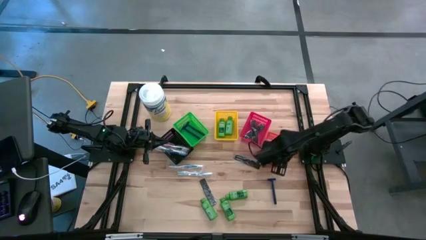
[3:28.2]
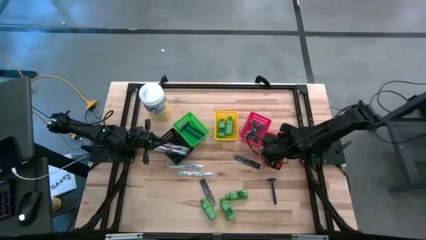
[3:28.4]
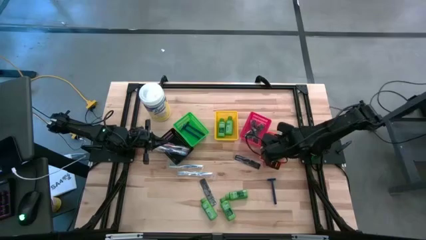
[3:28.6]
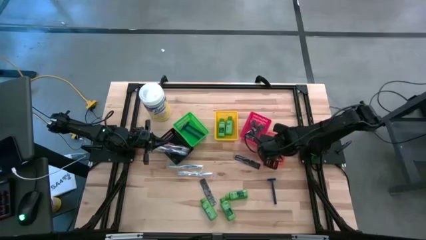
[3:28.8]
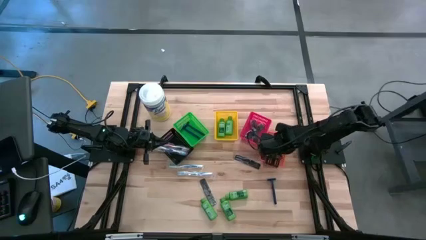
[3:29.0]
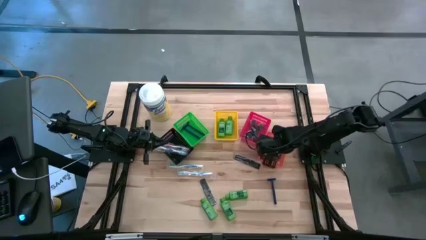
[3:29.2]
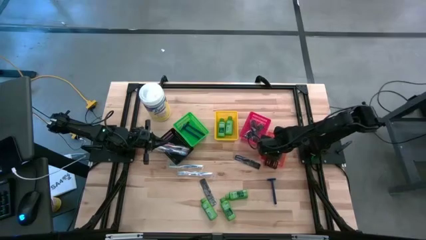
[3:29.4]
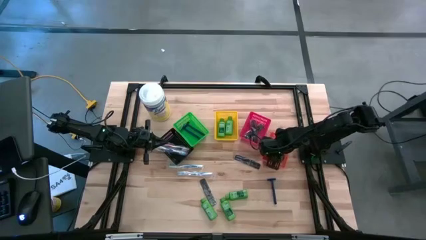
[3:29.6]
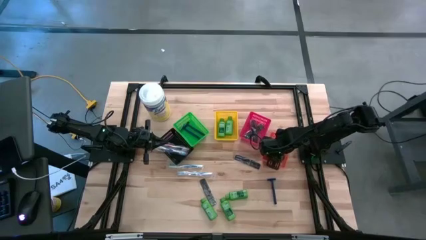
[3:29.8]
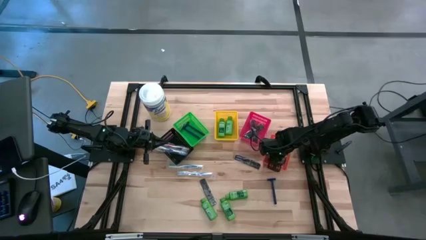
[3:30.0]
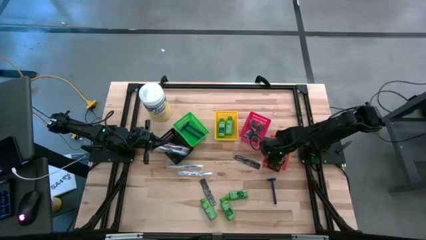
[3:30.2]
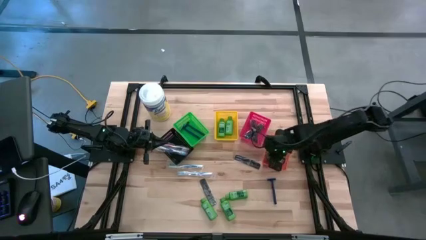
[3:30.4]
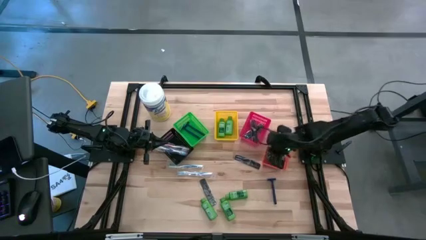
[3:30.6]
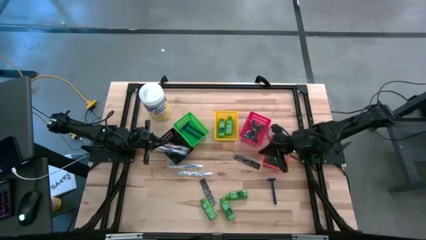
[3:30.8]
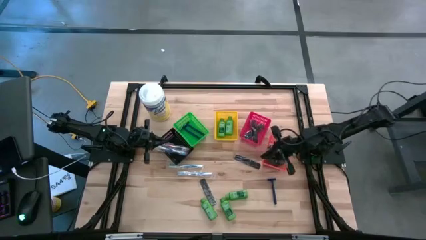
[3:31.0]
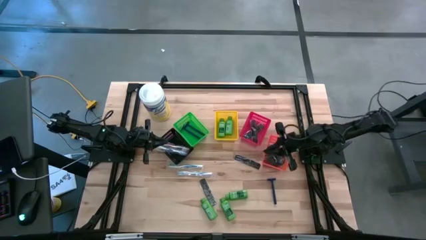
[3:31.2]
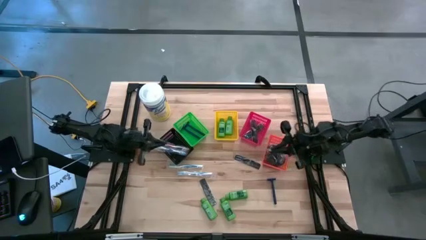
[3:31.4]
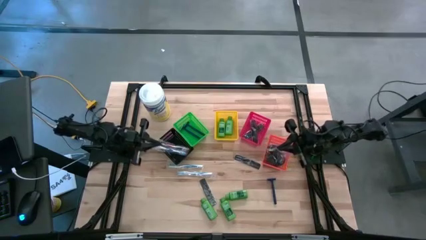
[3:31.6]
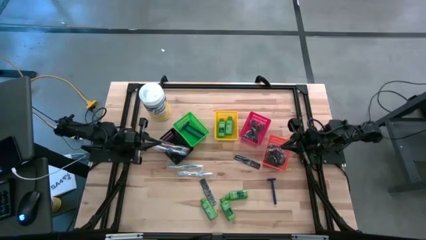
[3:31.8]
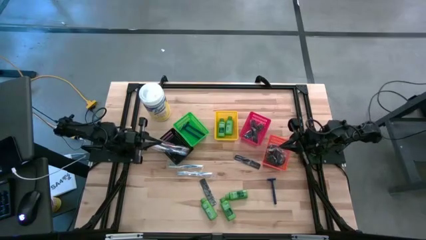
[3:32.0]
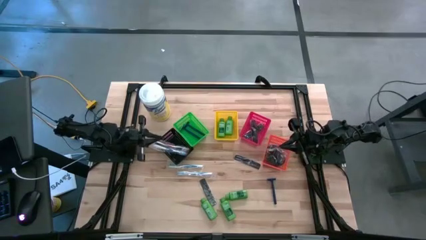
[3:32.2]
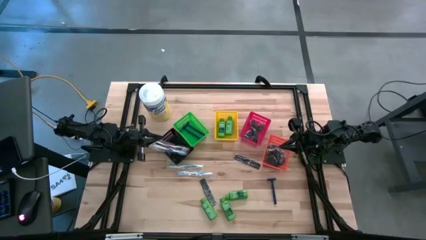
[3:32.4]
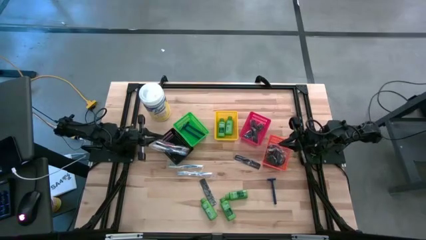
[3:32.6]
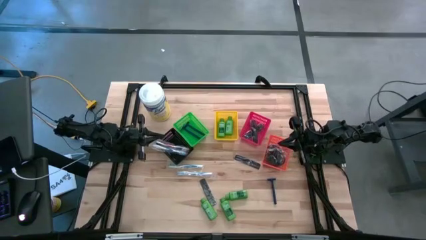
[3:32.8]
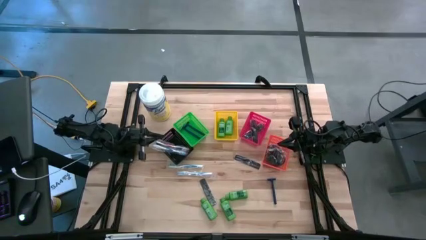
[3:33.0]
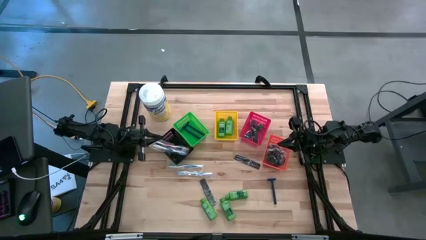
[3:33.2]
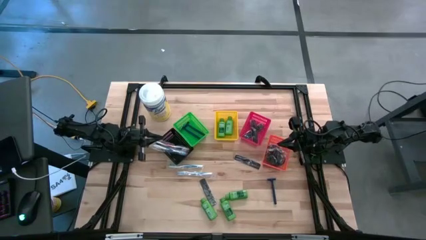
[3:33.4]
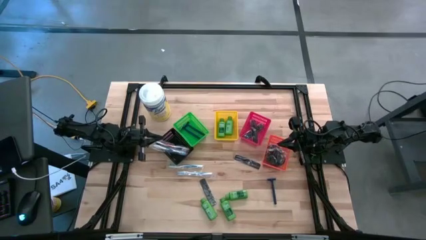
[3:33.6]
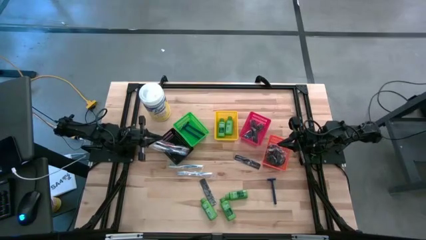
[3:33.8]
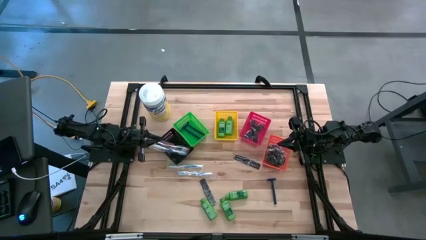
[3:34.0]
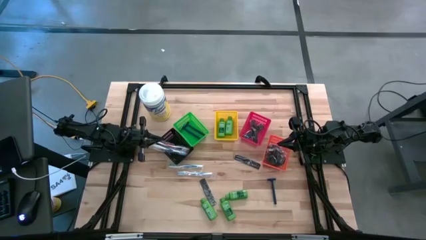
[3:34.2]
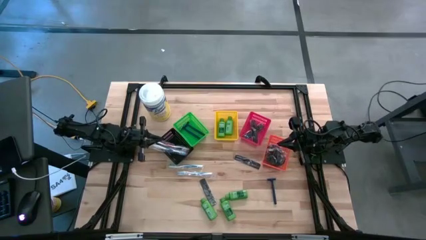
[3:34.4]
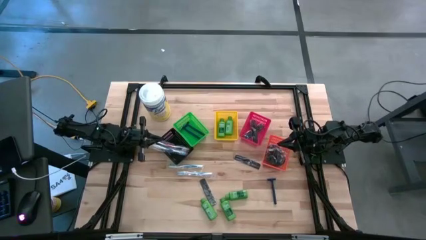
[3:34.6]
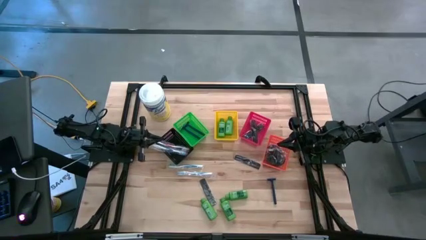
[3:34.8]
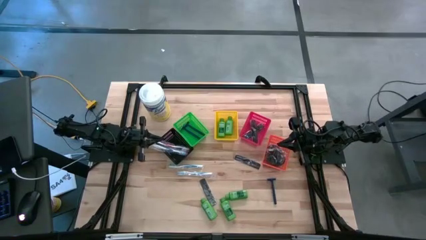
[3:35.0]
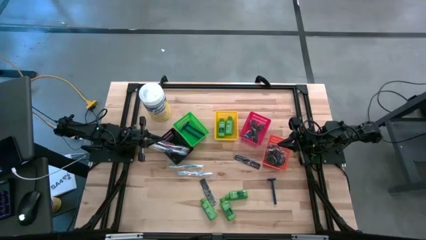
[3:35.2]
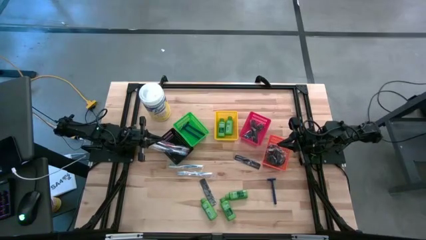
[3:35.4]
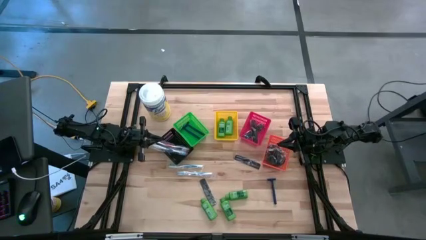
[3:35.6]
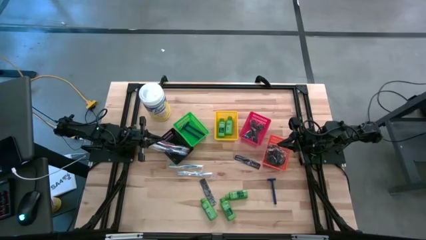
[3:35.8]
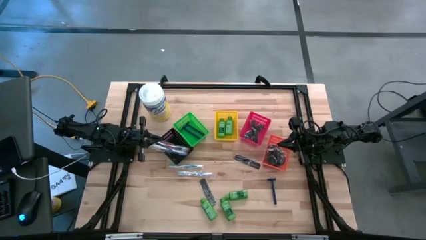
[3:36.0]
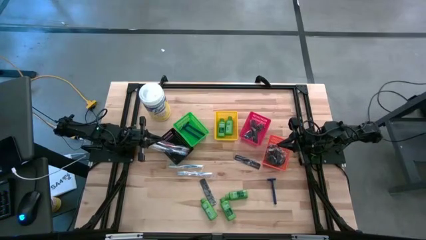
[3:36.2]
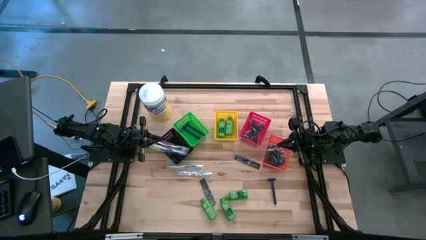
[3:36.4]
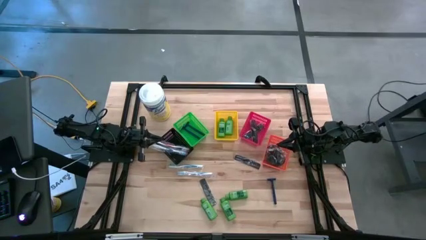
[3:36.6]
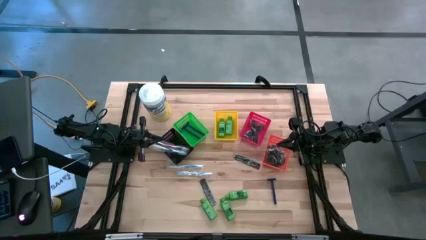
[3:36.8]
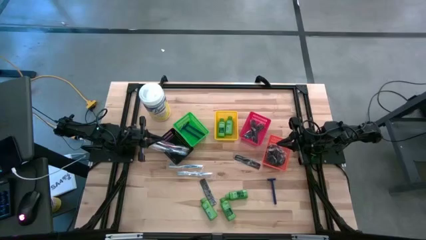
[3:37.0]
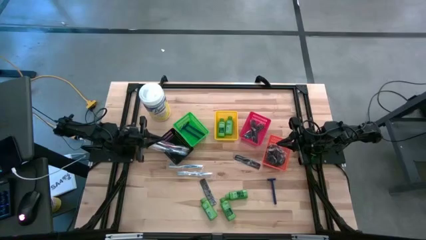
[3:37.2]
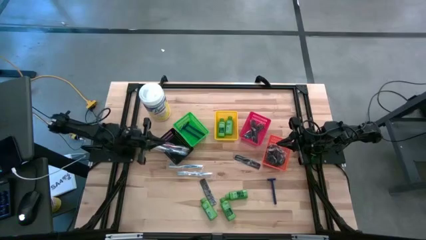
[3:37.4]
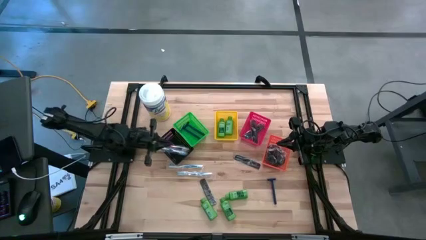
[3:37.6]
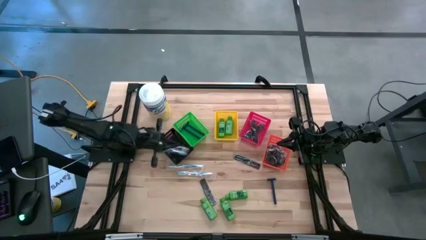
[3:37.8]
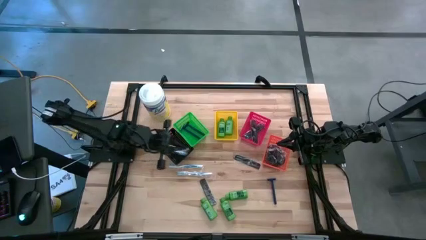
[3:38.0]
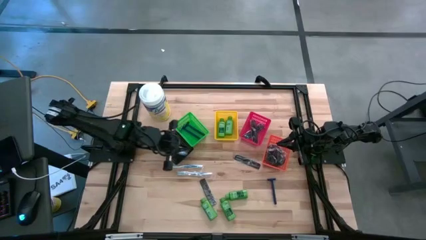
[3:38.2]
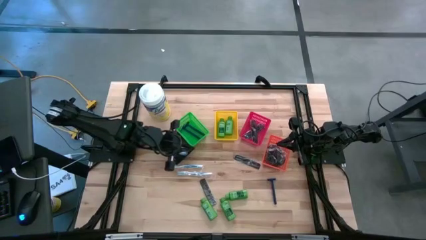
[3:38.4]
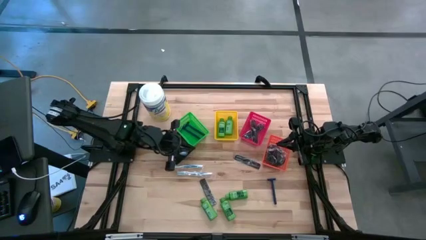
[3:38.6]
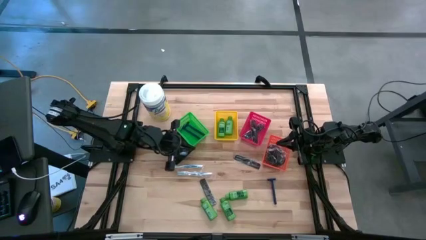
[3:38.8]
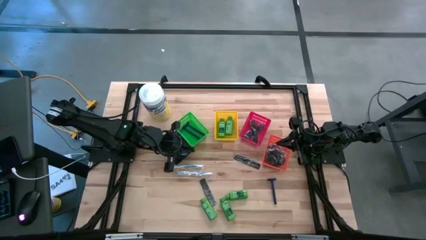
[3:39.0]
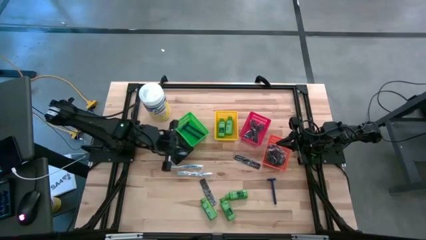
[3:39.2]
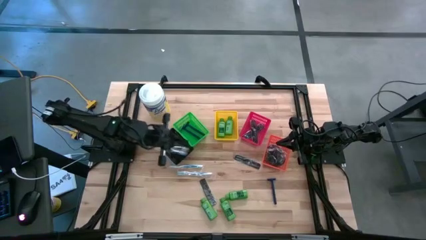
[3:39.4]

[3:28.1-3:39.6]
Task: Pick & Place Travel size toiletries
Put the left green bottle shampoo into the yellow bin

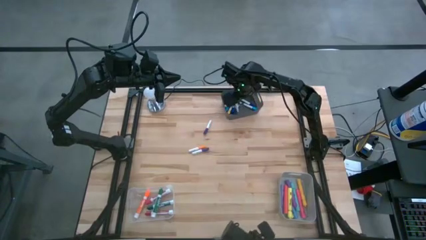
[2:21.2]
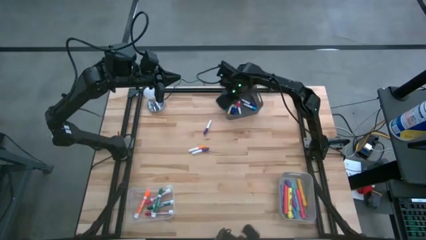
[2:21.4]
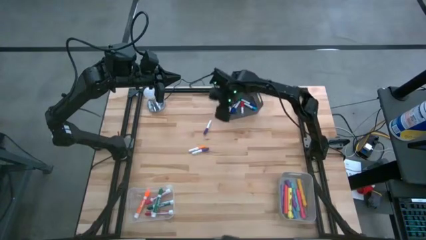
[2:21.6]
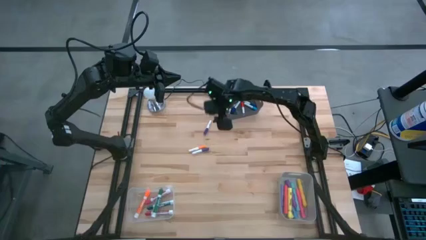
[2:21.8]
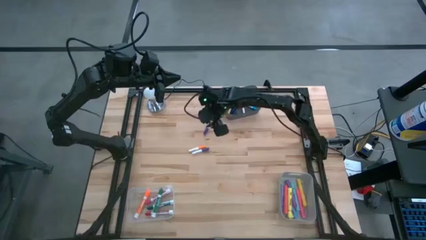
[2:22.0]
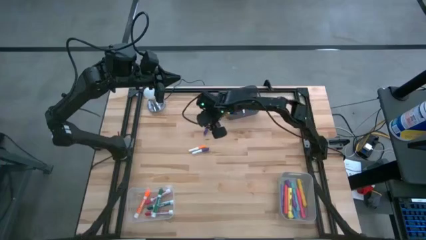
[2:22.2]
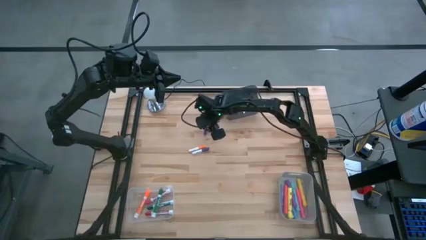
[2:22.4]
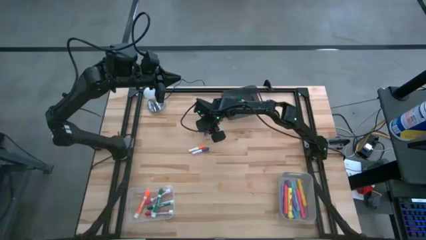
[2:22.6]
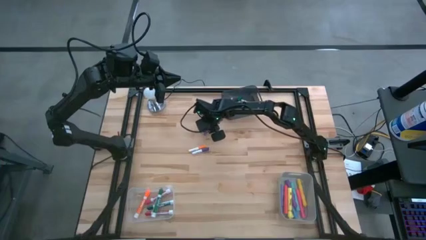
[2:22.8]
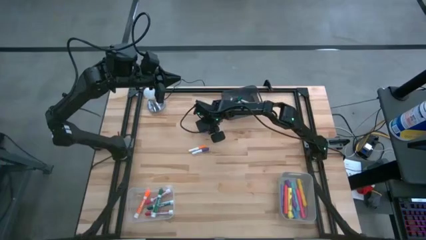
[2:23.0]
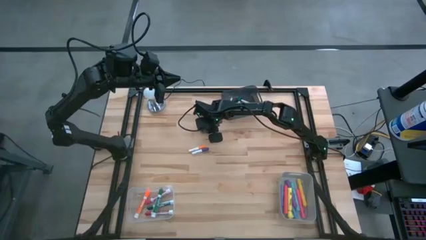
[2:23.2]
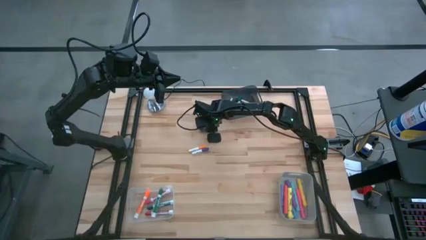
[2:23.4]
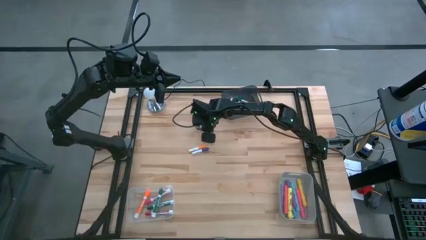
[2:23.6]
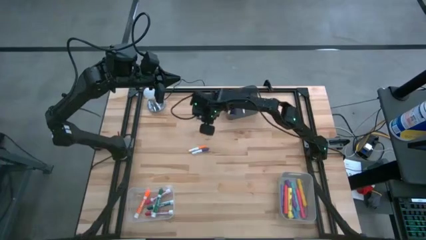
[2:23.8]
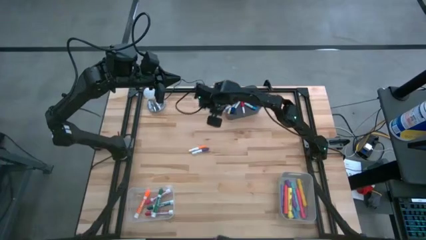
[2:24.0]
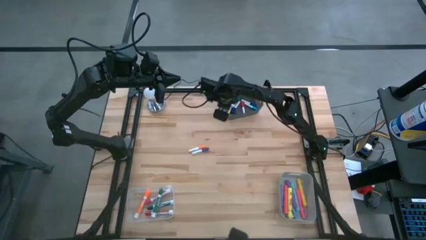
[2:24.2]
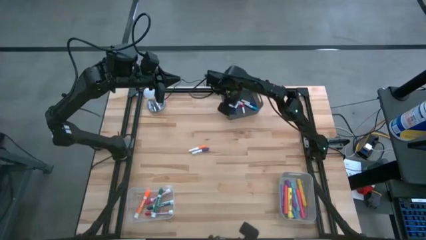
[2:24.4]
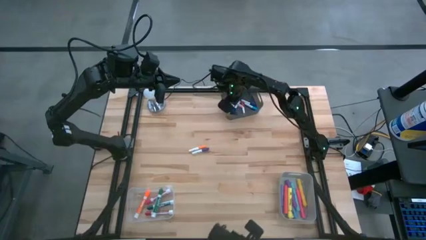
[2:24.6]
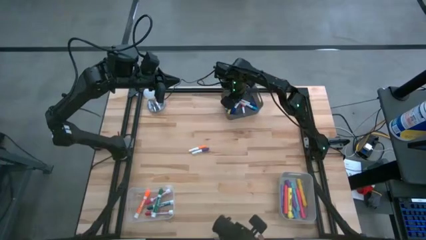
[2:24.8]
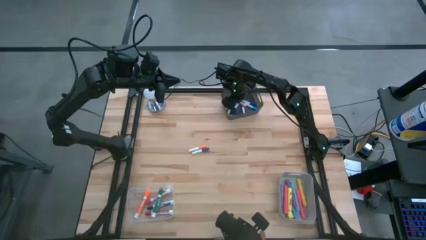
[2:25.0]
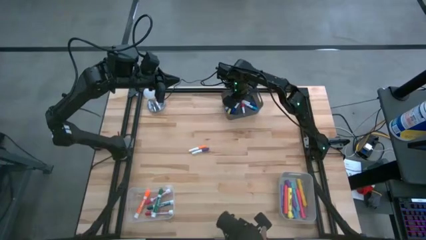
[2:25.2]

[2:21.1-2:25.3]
Task: Pick & Place Markers
Put the top small purple highlighter pen into the black bin
